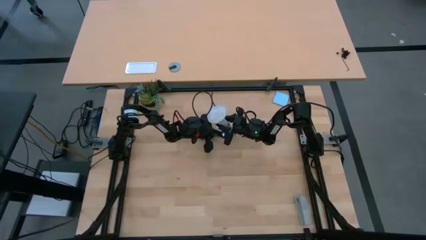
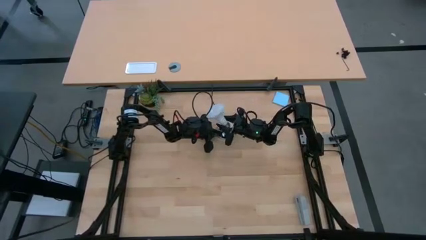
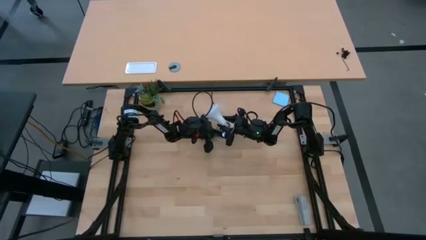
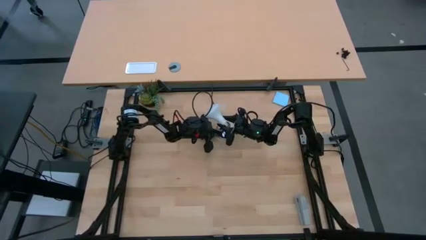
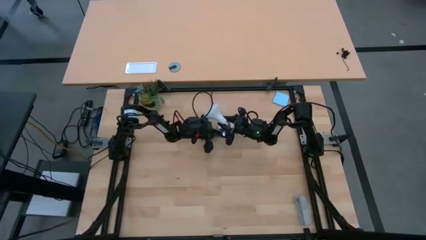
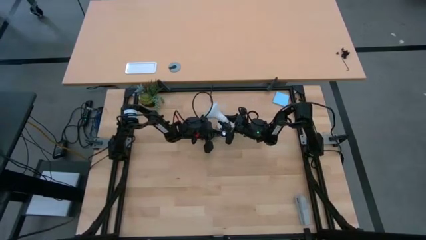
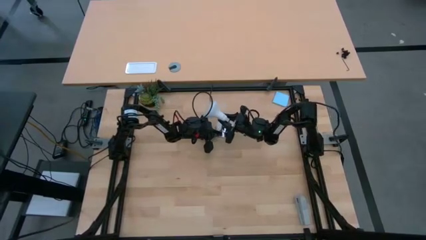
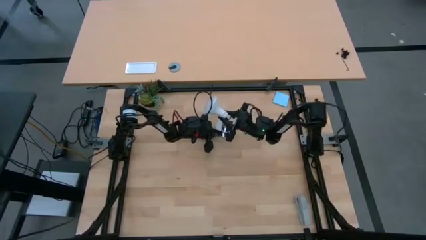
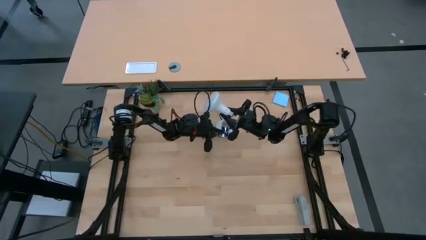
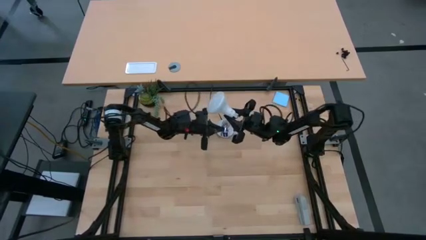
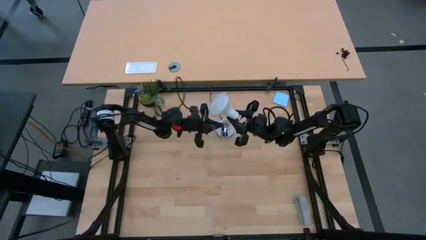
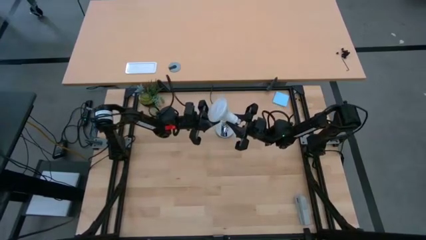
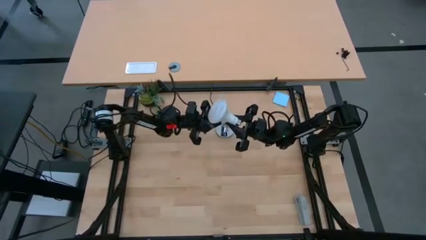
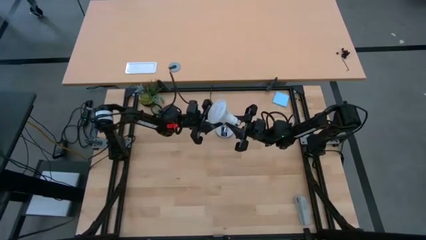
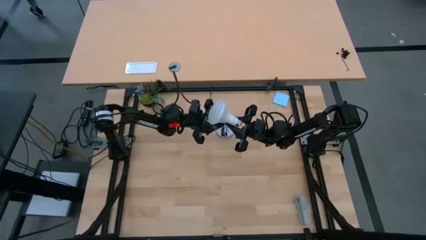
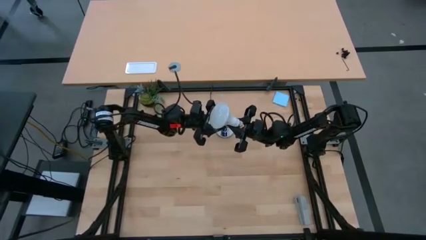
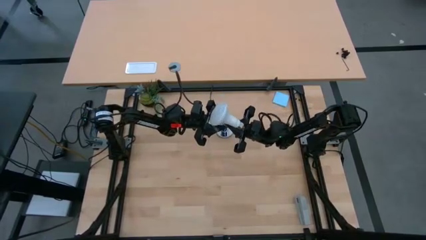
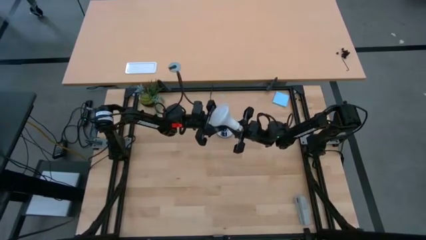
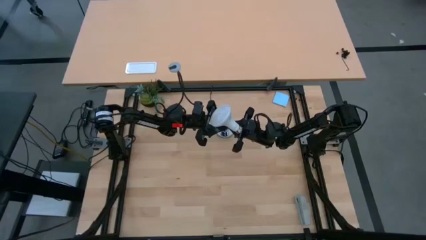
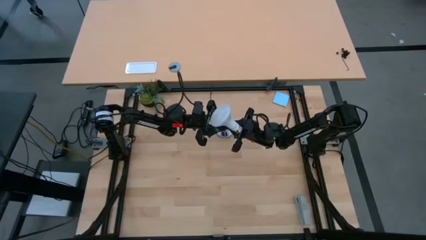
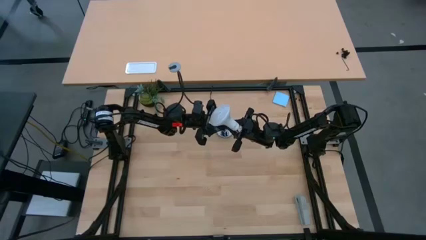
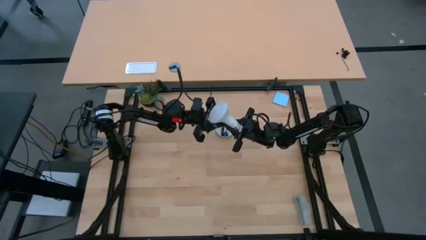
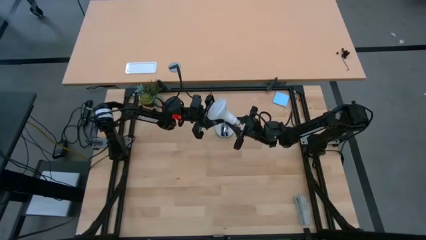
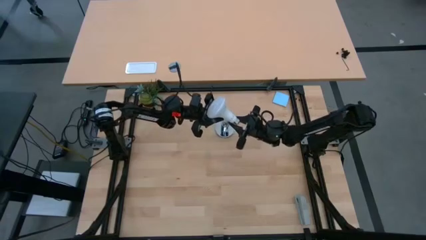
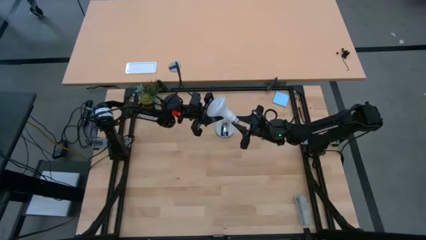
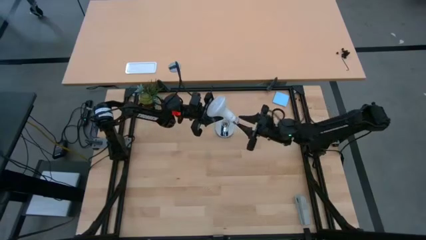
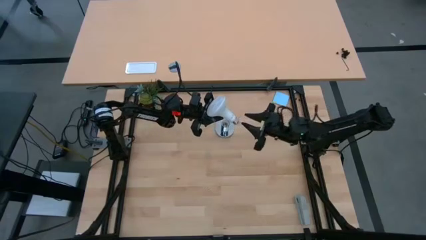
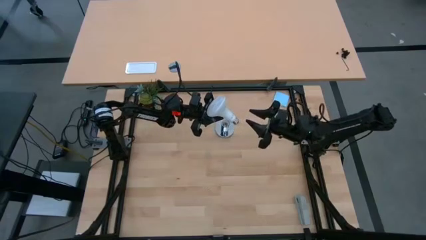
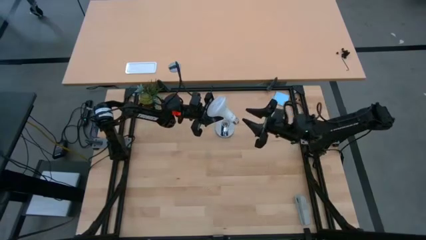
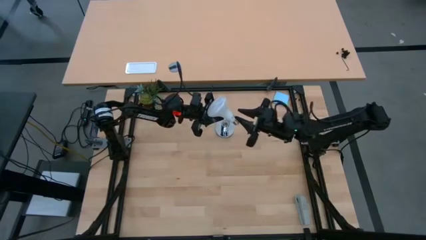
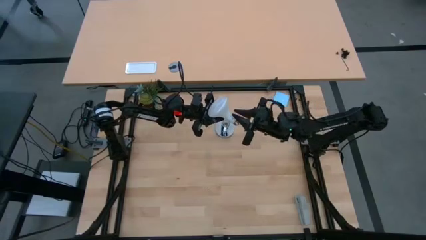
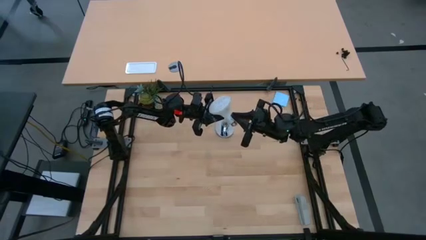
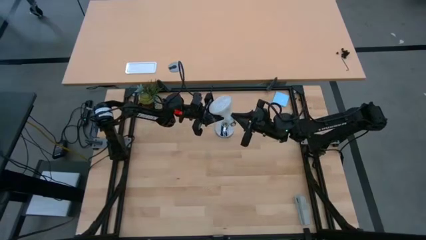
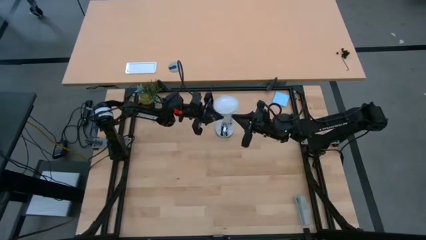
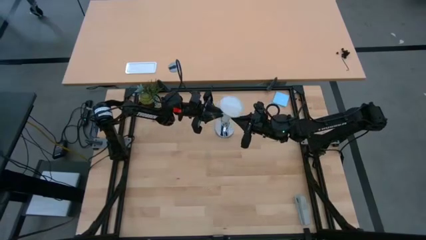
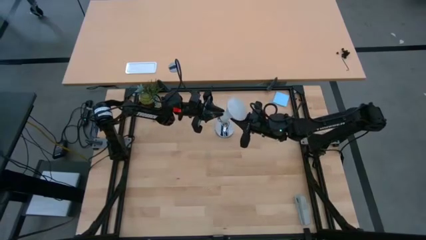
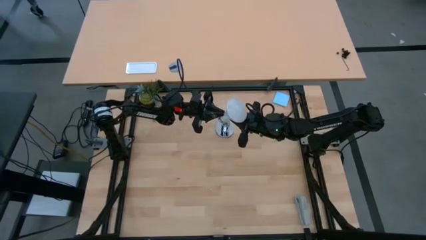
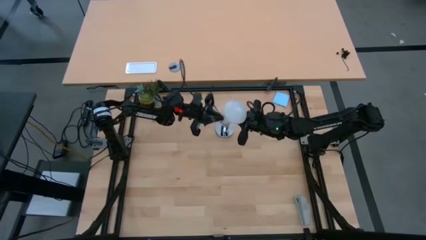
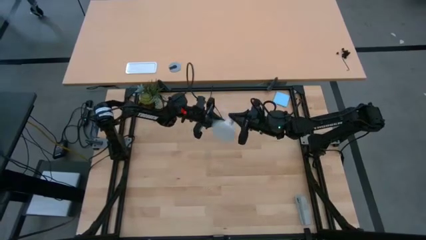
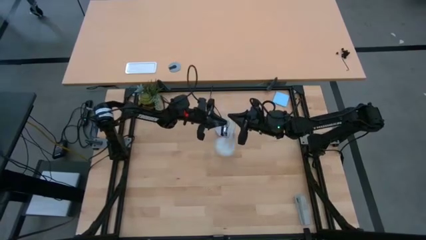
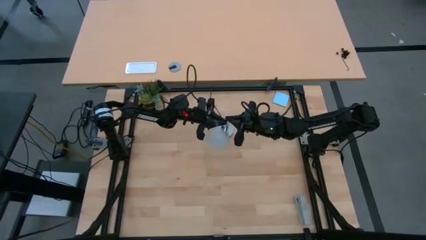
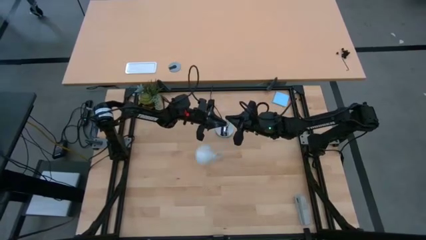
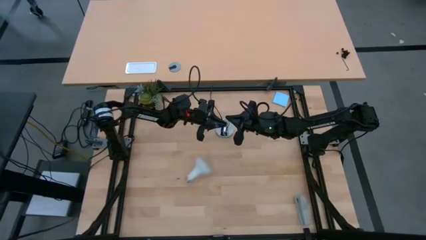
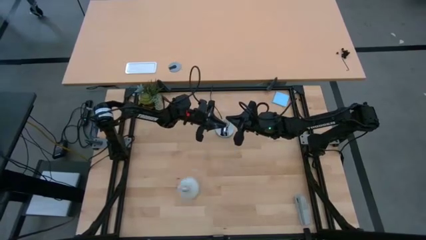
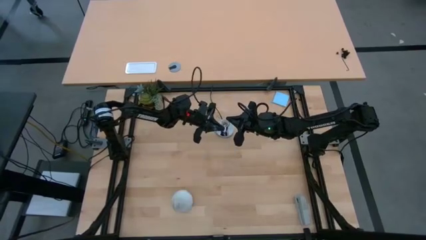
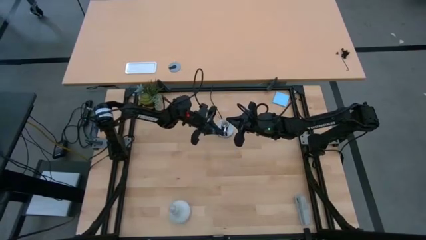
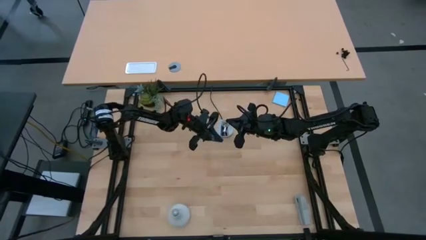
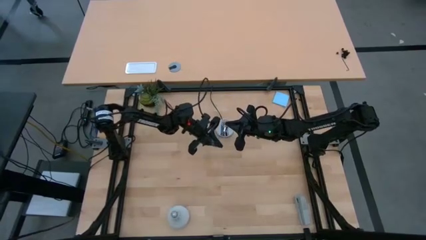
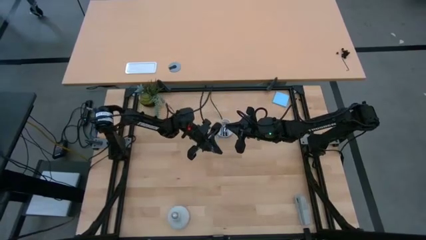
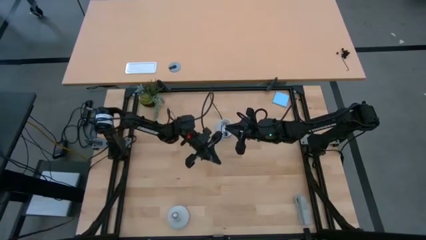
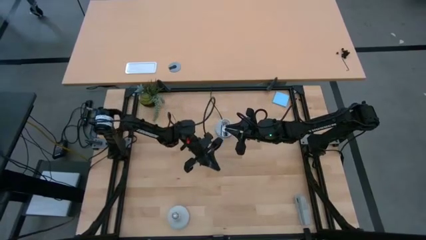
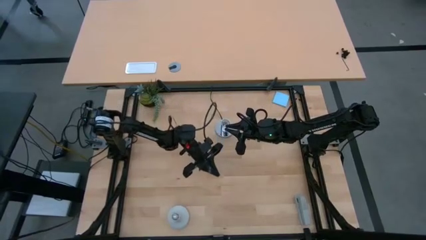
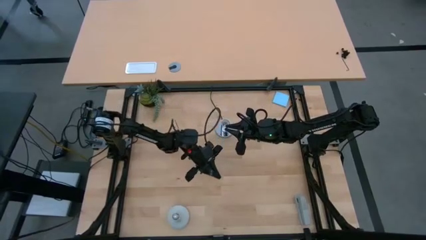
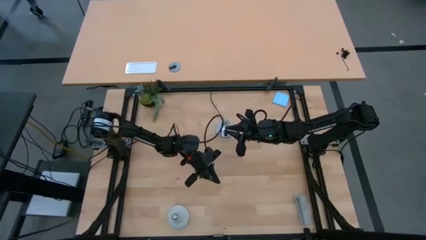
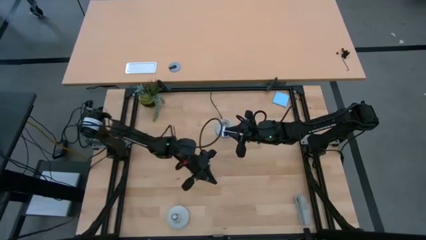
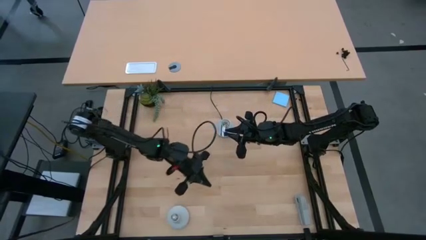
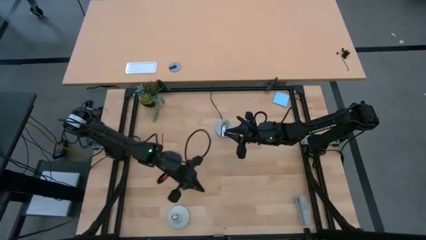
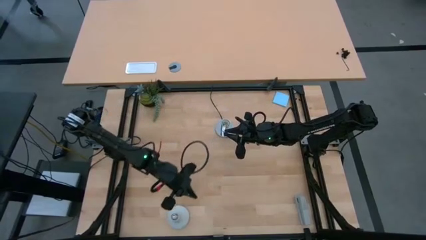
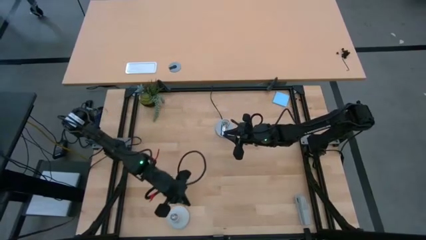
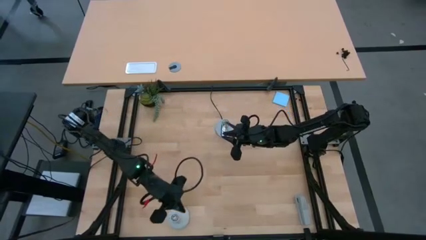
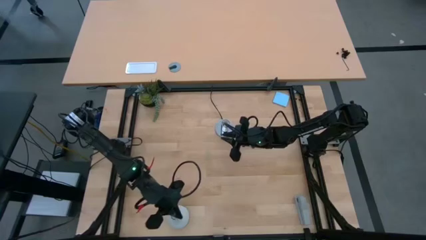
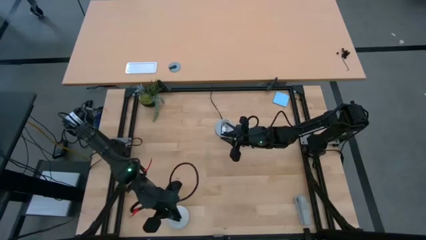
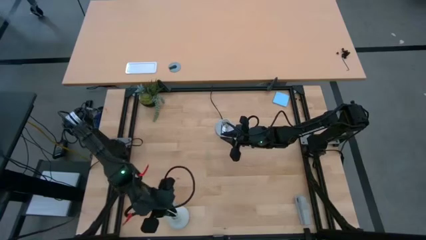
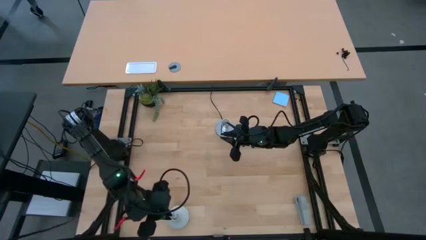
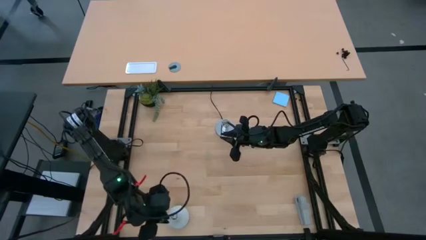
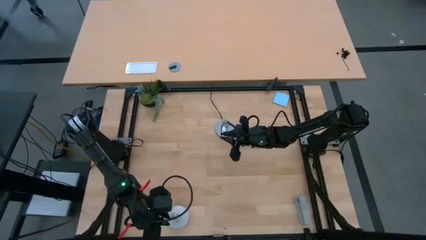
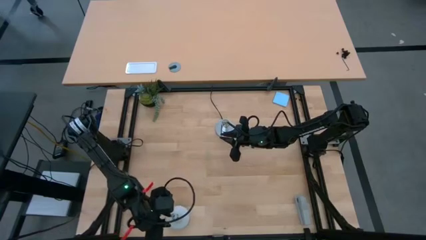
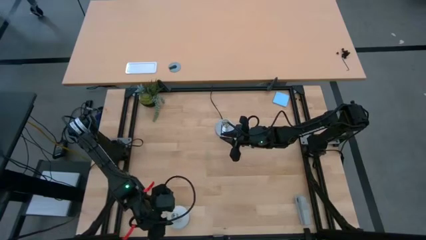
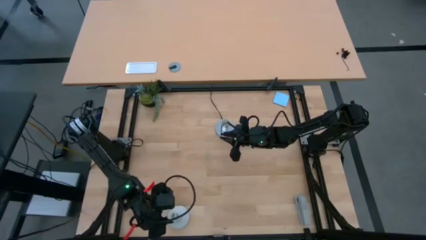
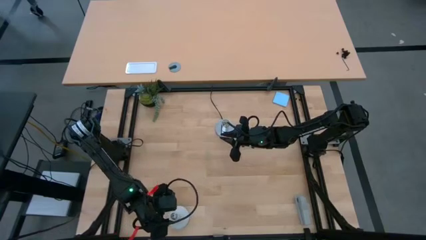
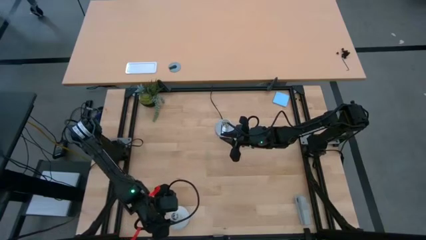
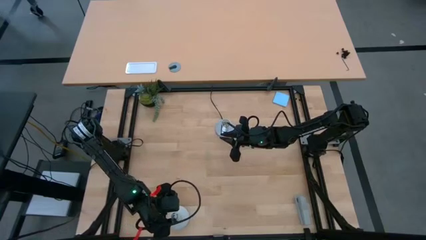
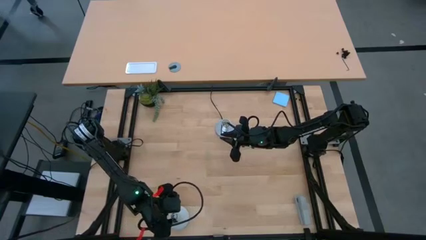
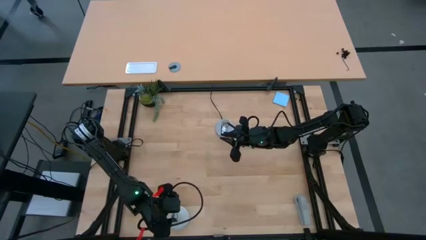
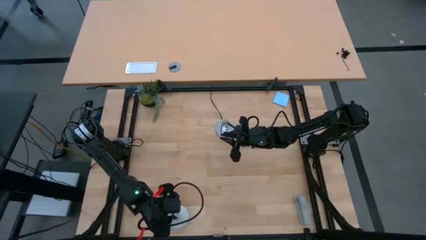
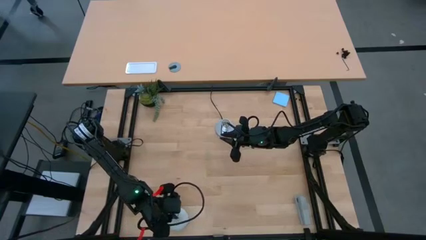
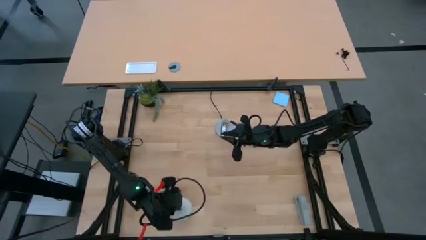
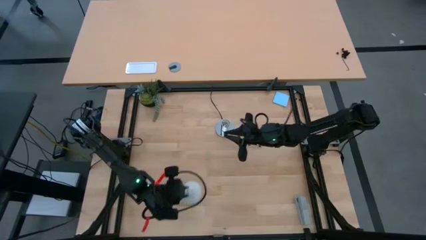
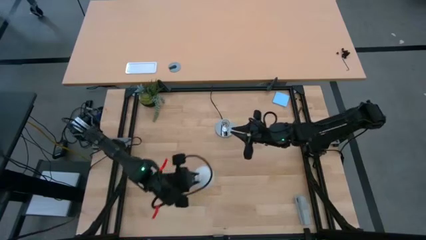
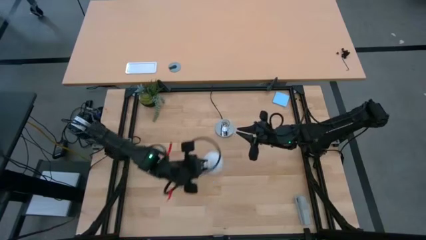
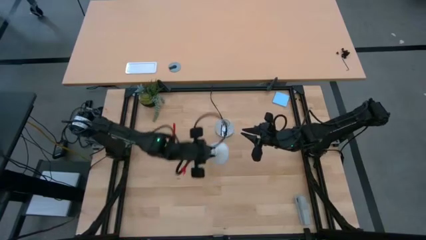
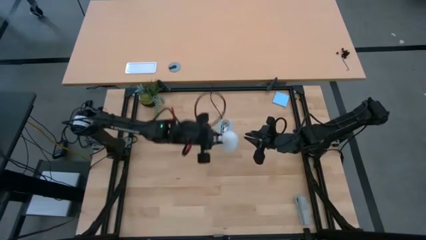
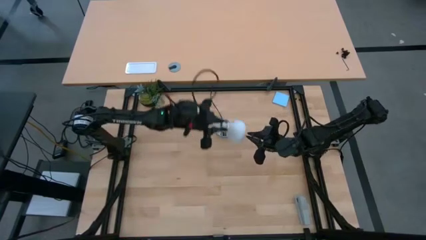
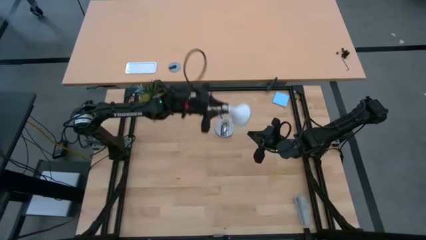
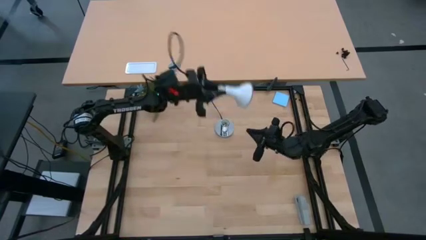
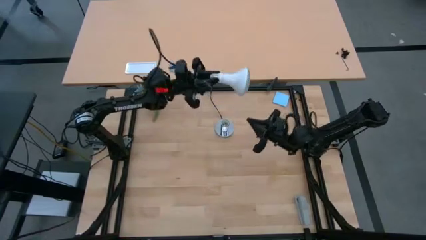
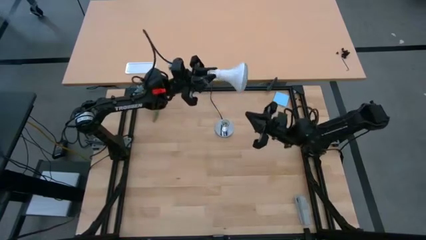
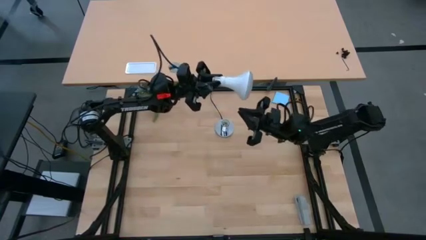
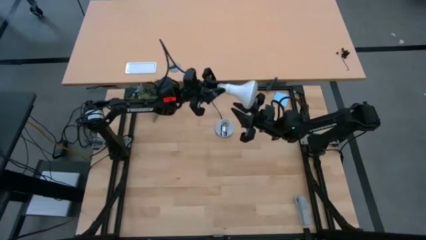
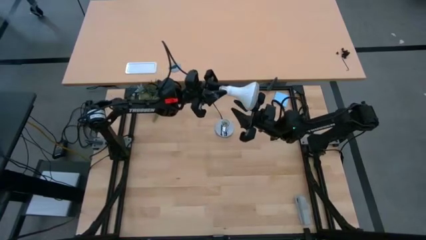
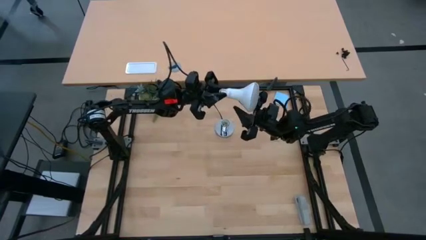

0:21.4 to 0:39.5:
Task: Screw lightbulb
Insert the white lightbulb into the desk lamp
